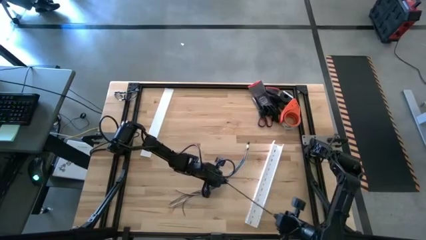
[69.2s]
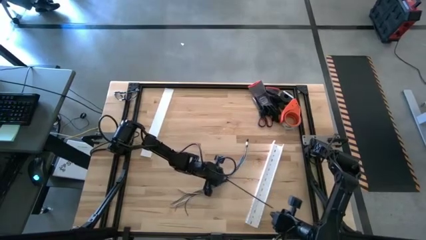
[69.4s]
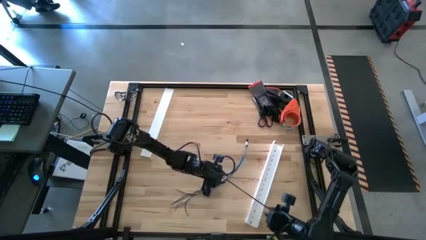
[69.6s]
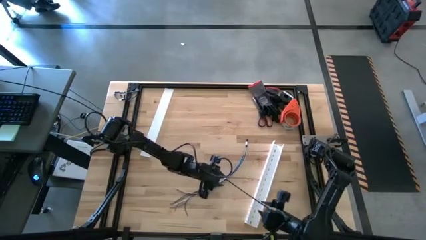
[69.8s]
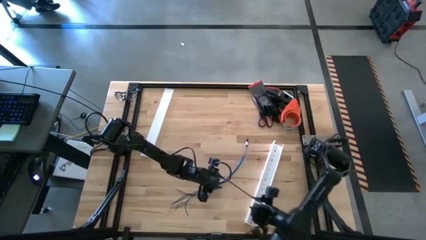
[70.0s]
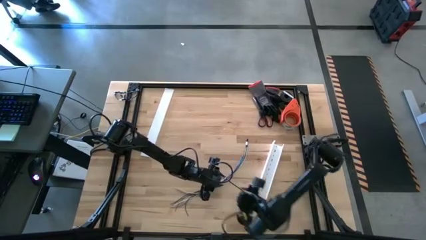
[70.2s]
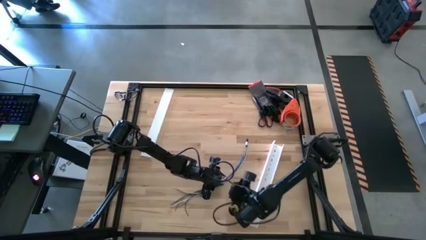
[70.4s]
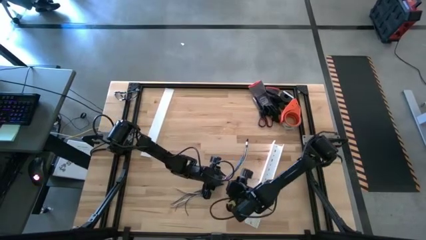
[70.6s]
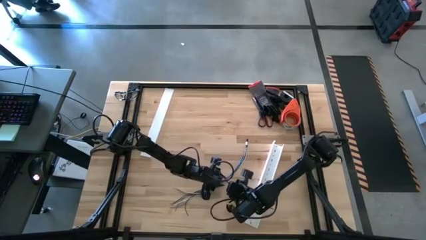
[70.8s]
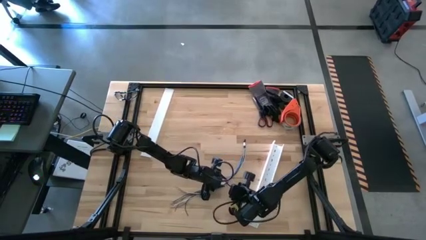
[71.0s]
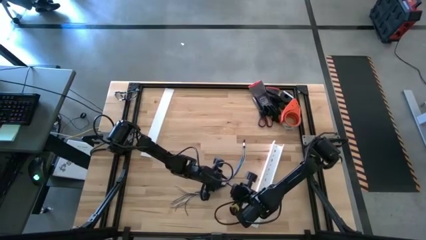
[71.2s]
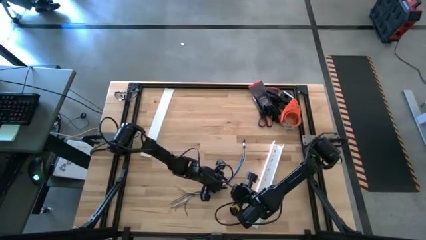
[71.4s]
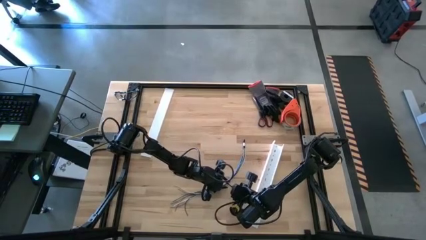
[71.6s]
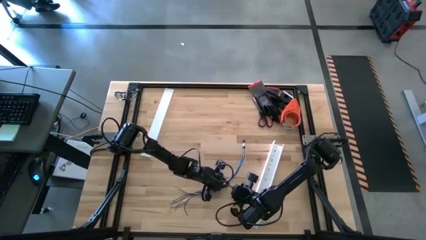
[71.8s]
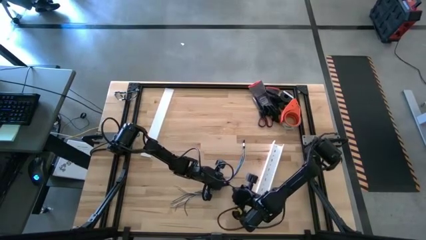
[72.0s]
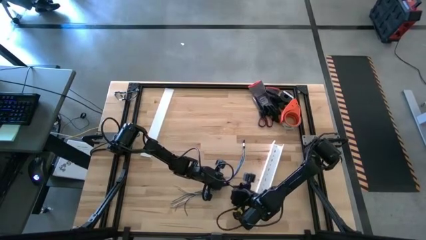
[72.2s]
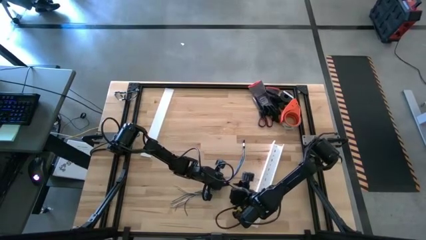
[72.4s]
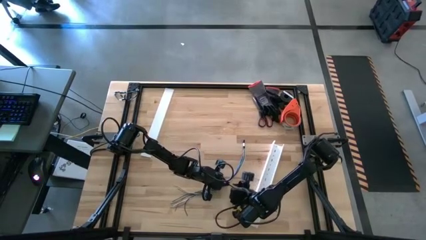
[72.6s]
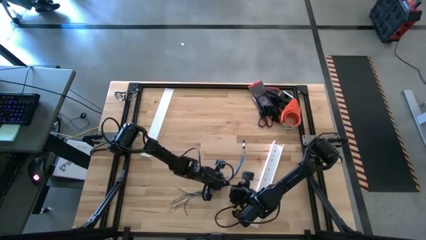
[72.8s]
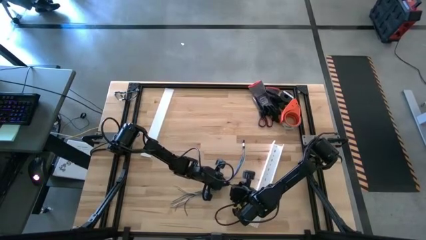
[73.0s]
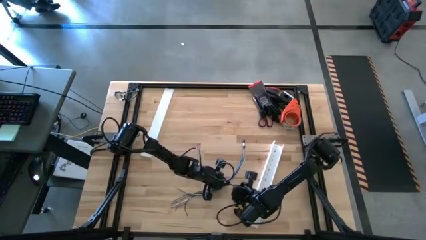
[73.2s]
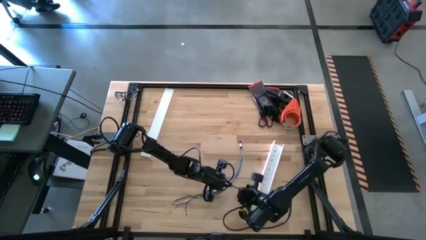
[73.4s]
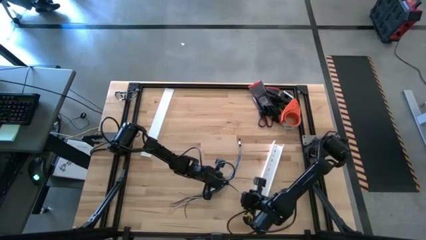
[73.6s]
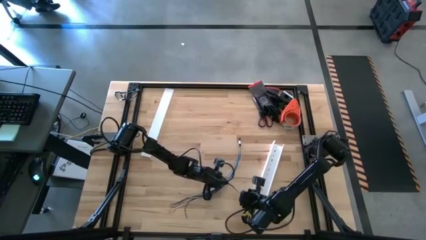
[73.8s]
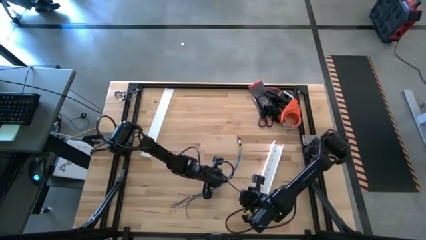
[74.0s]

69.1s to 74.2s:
Task: Ziptie cables
Wrap the colored cables with the black zip tie

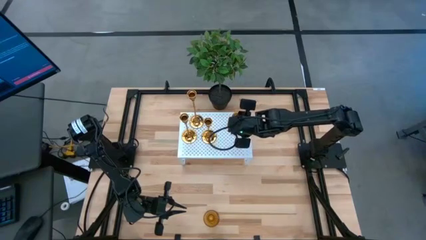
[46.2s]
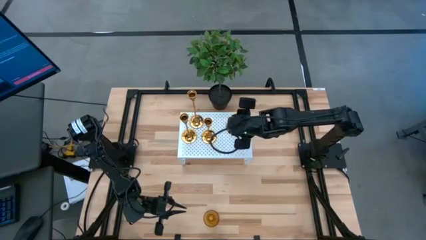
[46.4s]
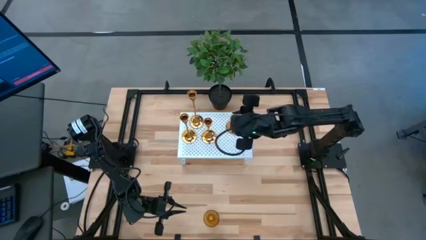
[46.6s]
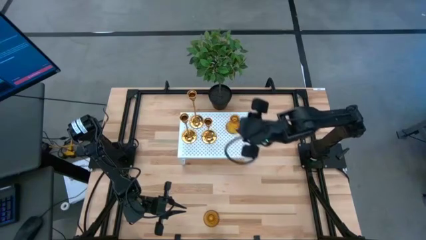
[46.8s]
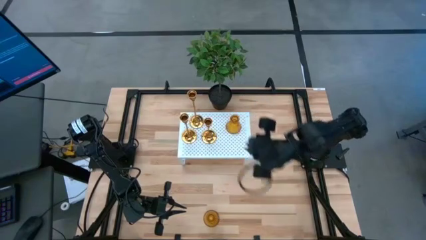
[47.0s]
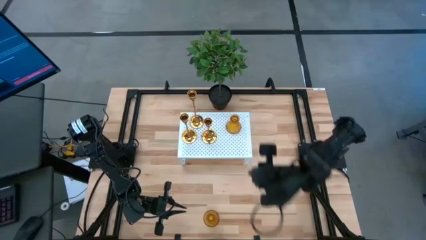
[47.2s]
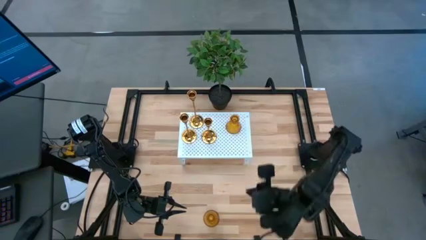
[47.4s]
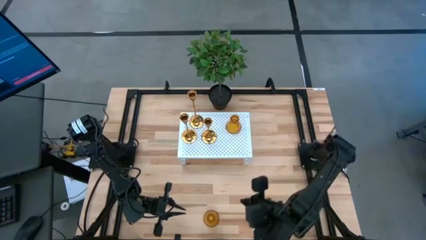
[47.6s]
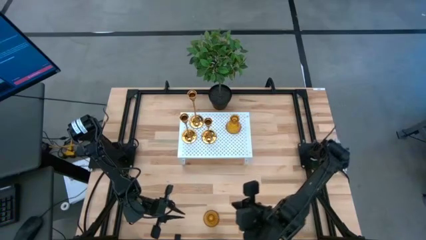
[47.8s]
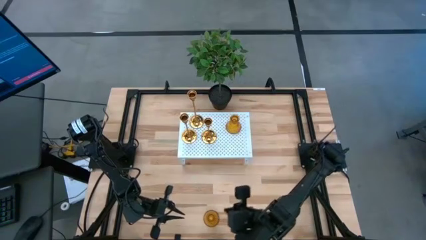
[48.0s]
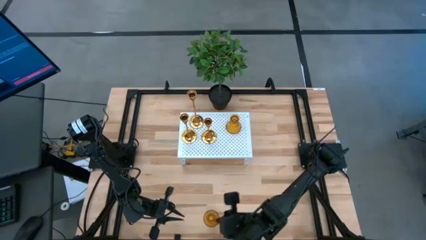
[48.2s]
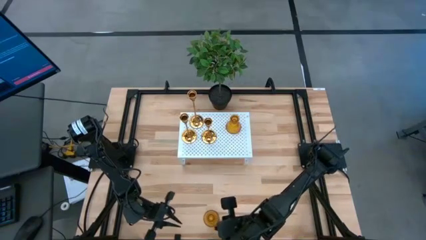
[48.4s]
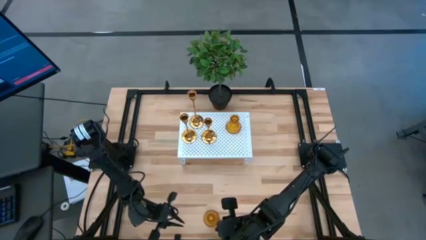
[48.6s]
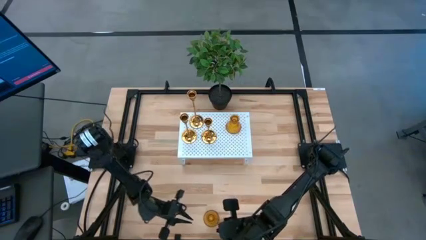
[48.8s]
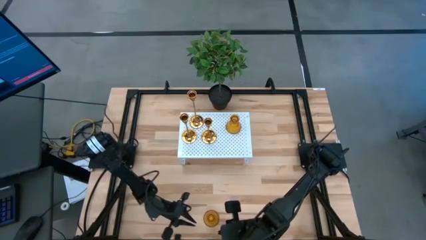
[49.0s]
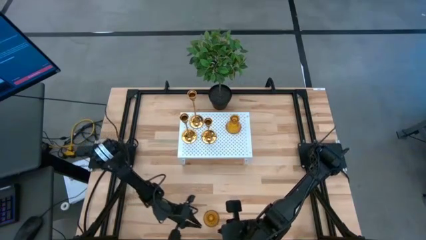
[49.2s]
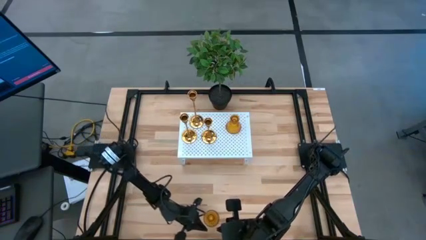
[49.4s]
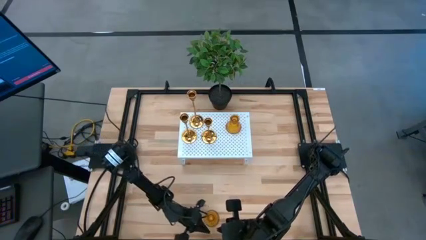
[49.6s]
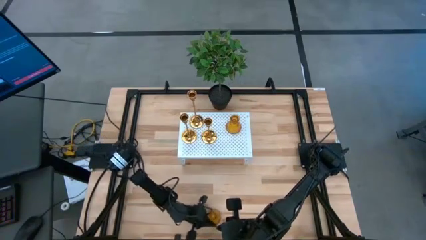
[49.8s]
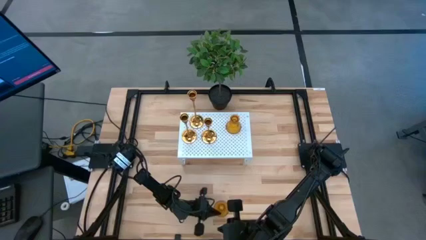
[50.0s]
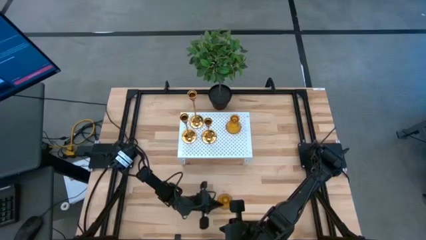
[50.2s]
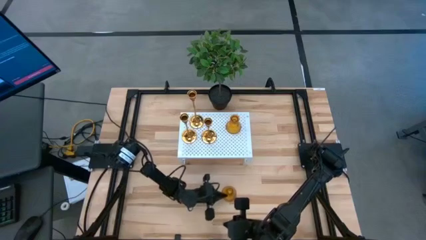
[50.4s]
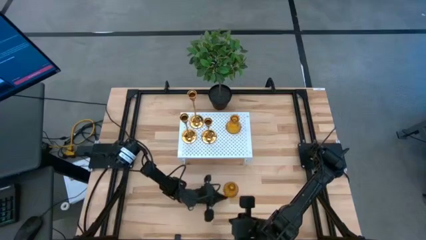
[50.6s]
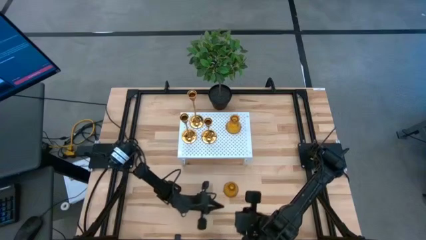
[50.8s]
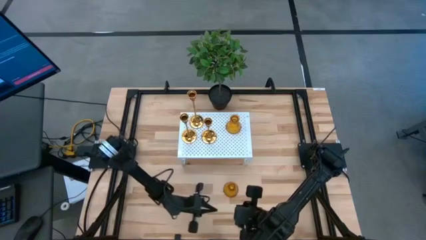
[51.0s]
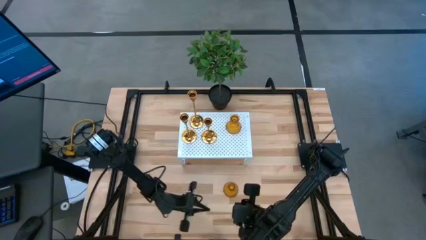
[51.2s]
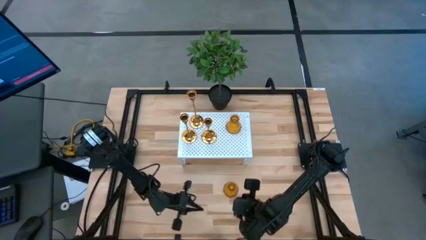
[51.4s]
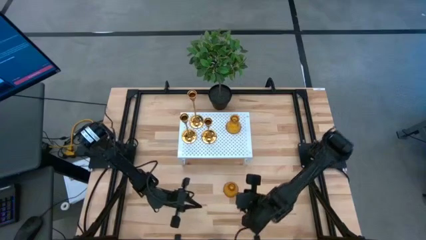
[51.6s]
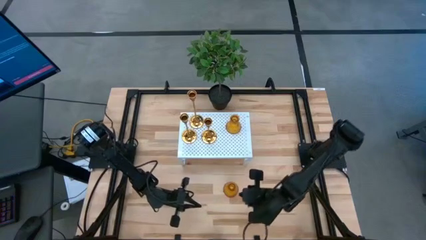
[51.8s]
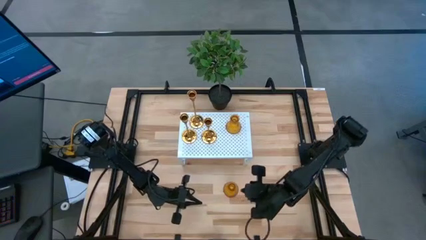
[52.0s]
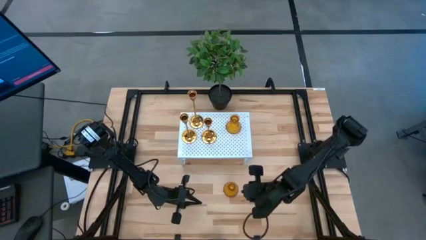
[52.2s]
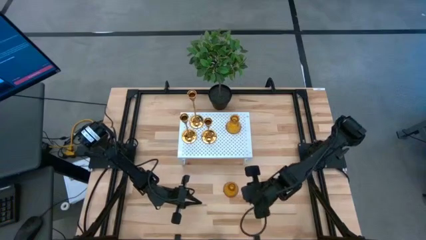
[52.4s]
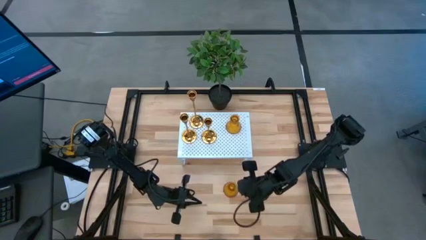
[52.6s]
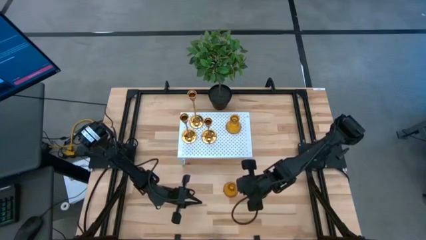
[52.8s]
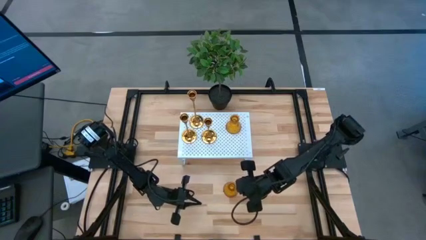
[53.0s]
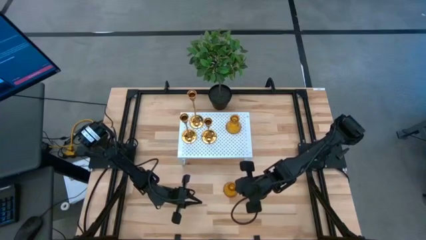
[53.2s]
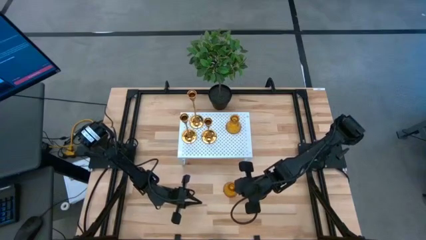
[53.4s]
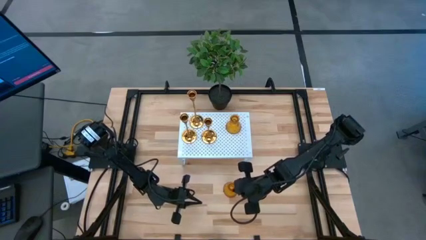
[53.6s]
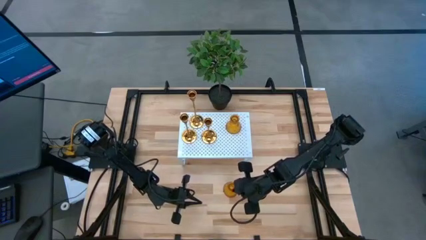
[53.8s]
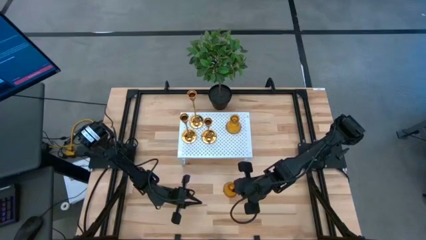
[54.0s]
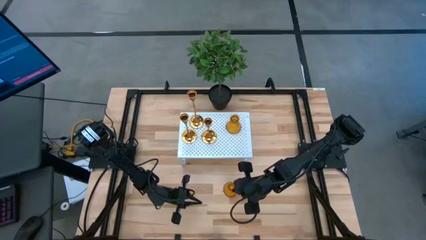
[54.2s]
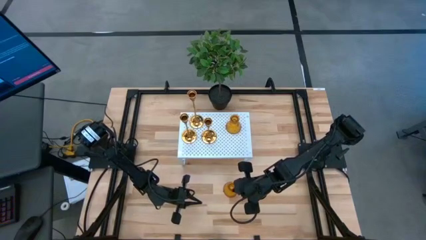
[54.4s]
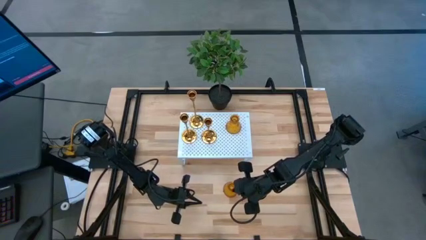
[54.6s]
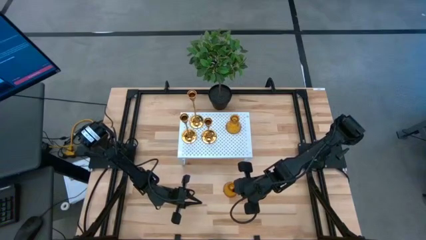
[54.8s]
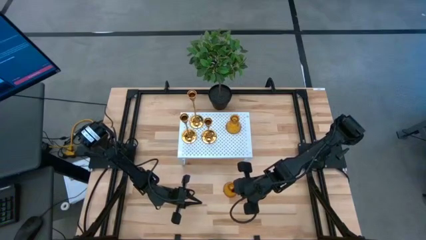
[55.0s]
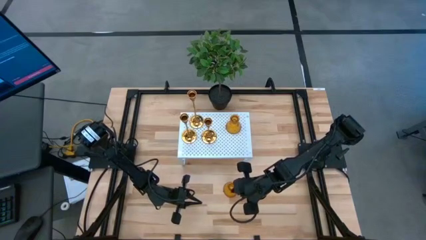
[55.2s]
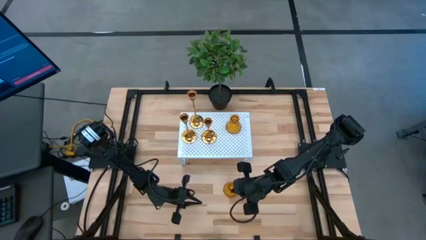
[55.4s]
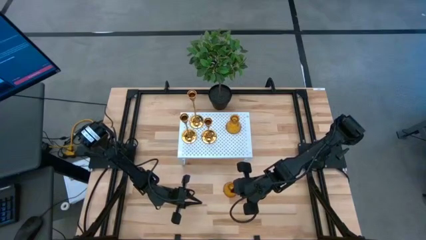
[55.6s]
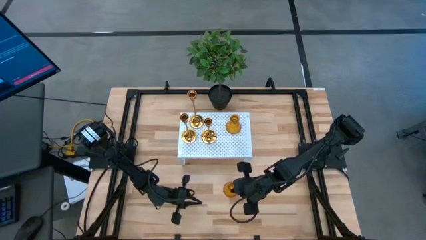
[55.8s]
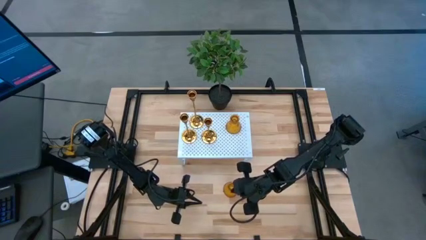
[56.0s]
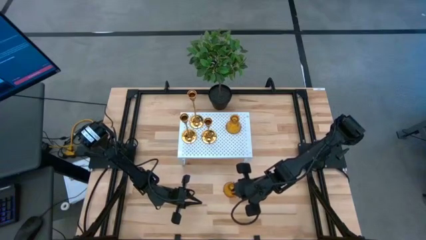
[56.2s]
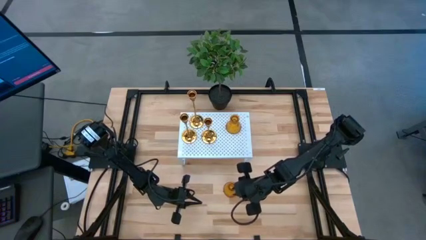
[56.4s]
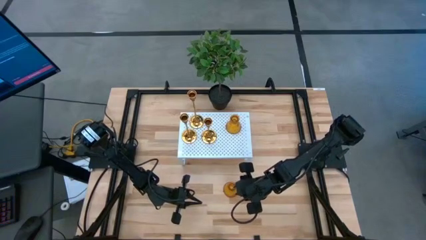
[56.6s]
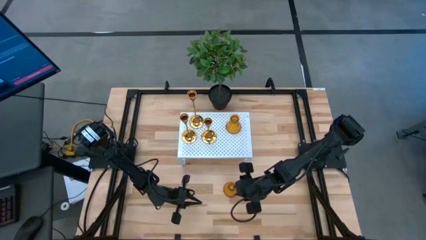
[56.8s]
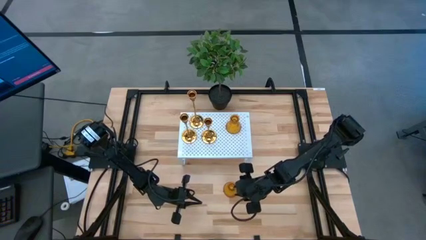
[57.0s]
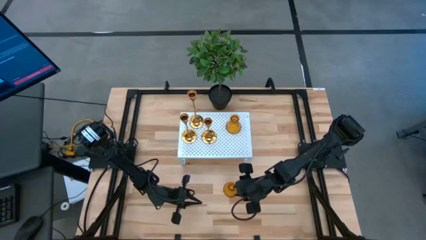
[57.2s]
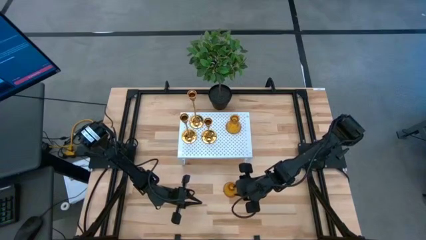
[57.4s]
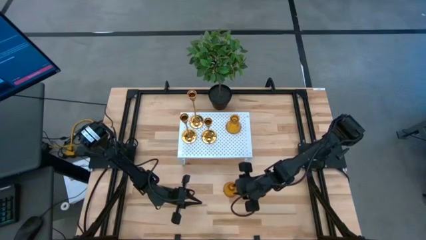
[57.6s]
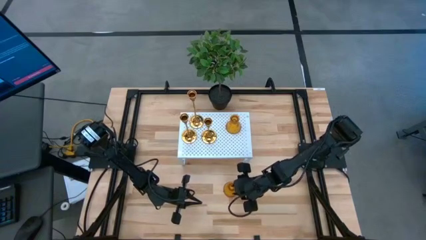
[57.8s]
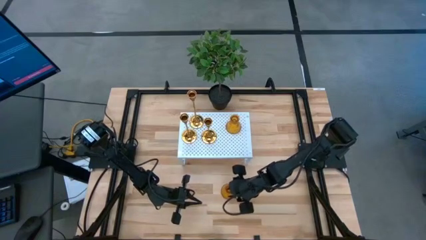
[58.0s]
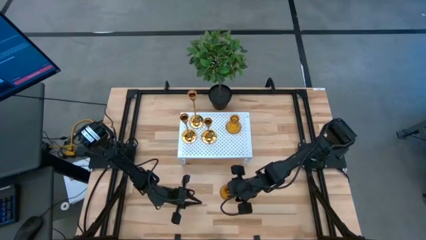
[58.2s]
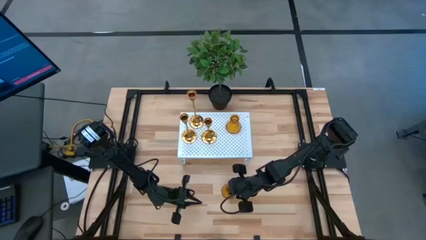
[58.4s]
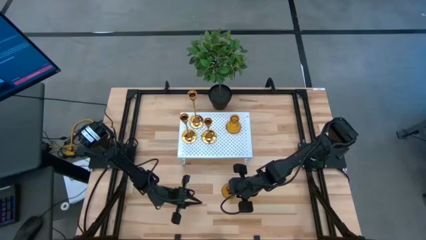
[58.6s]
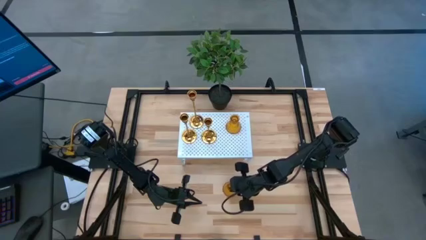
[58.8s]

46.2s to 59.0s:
Task: Pick & Place candle stick holders
Put the brown candle holder on the shelf
